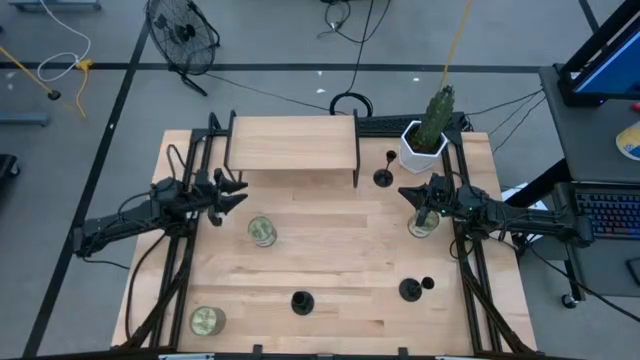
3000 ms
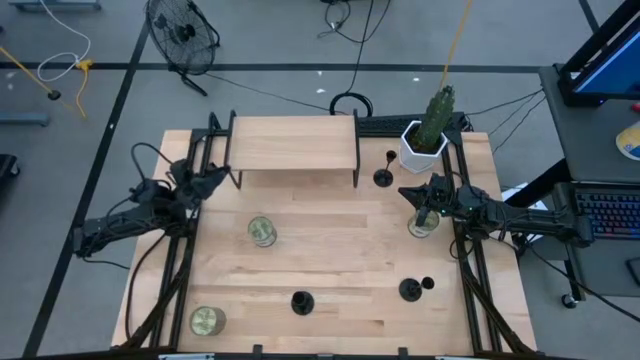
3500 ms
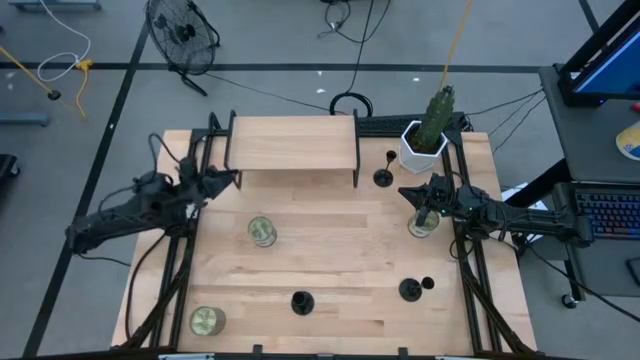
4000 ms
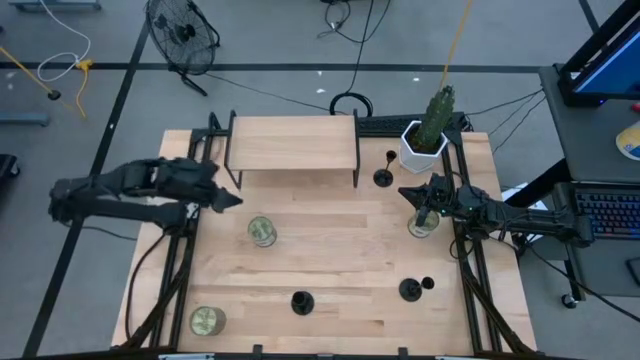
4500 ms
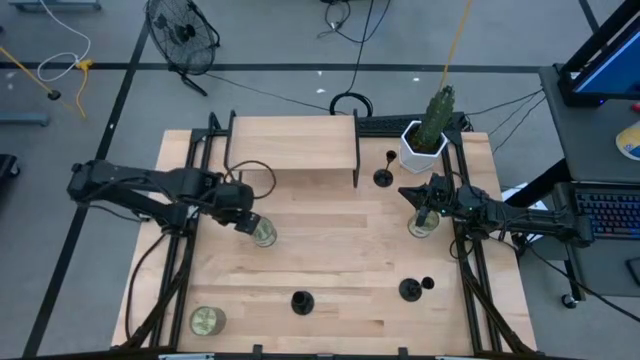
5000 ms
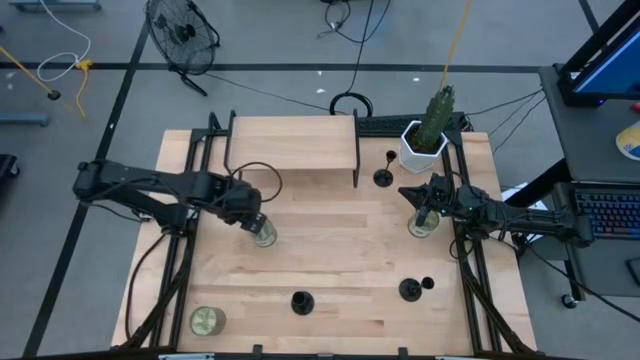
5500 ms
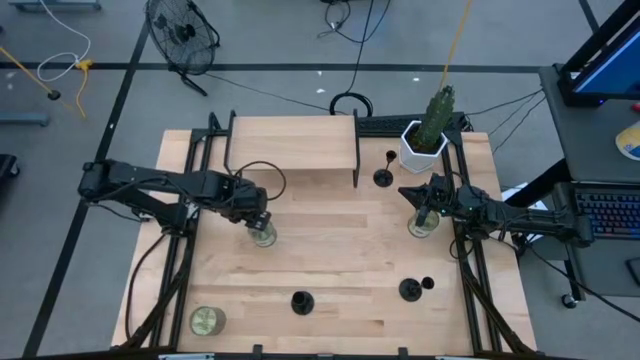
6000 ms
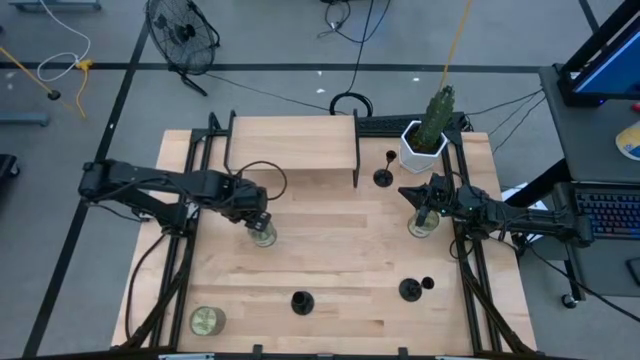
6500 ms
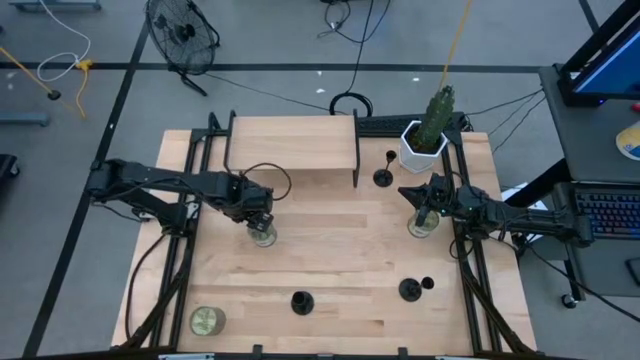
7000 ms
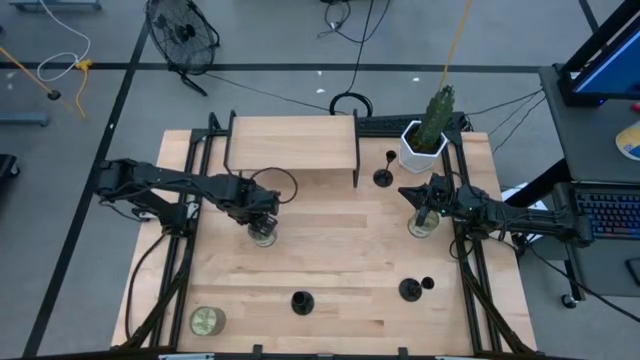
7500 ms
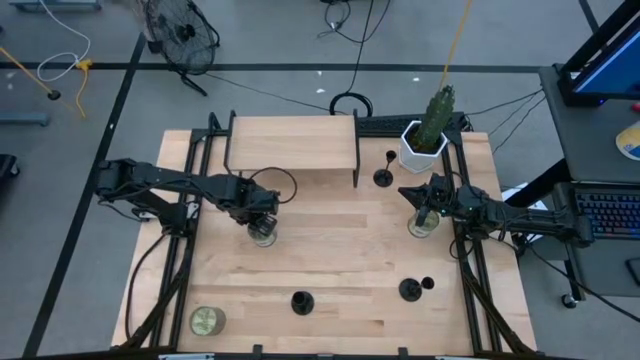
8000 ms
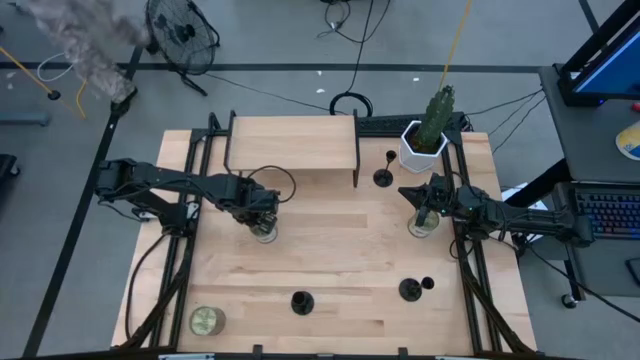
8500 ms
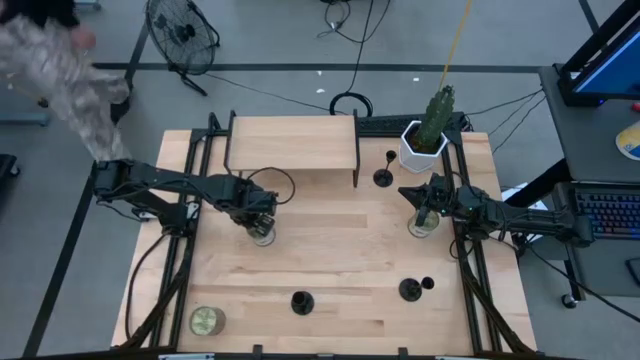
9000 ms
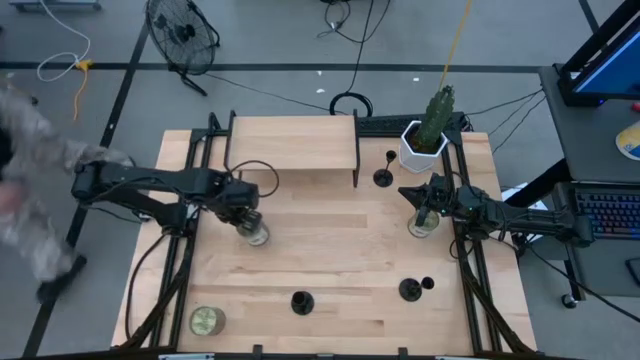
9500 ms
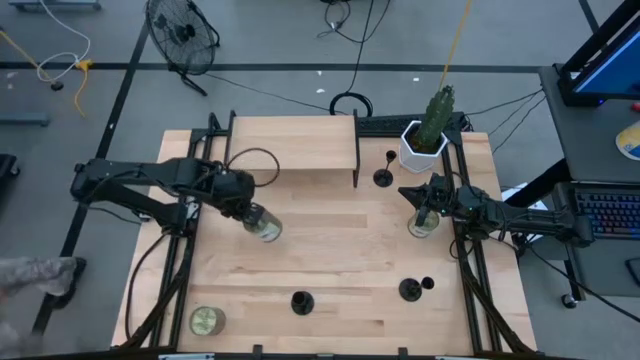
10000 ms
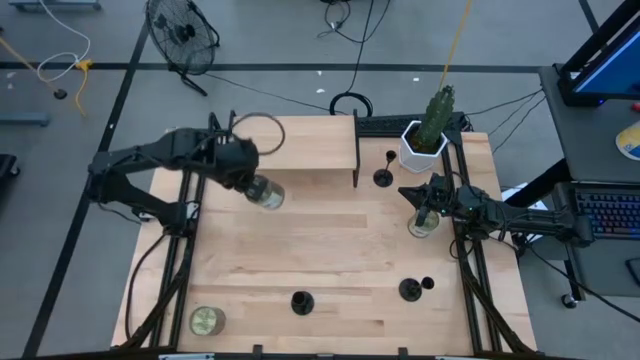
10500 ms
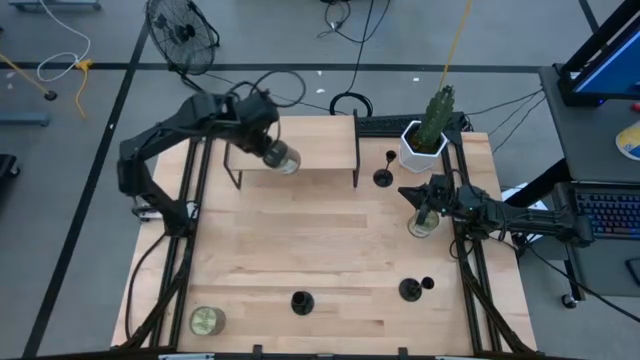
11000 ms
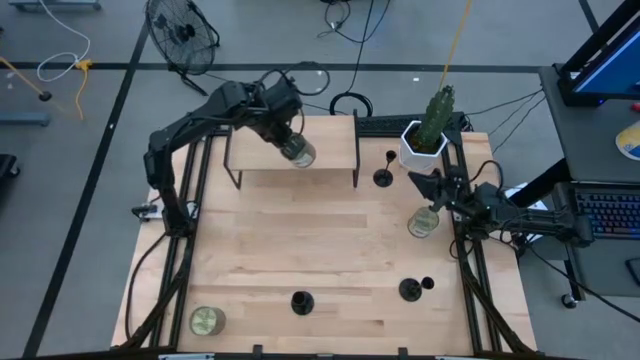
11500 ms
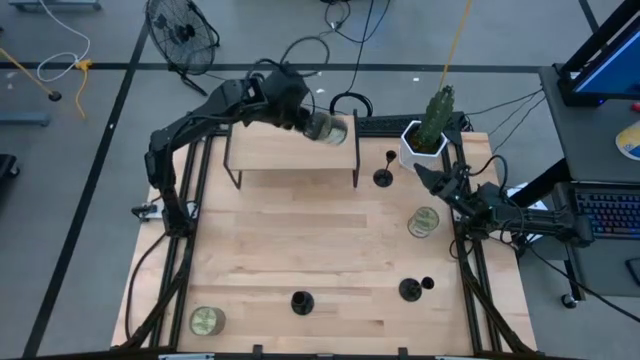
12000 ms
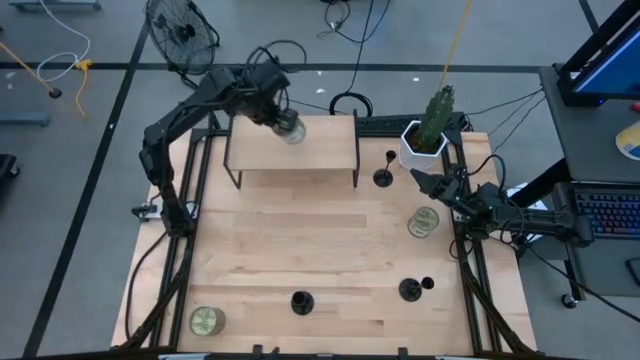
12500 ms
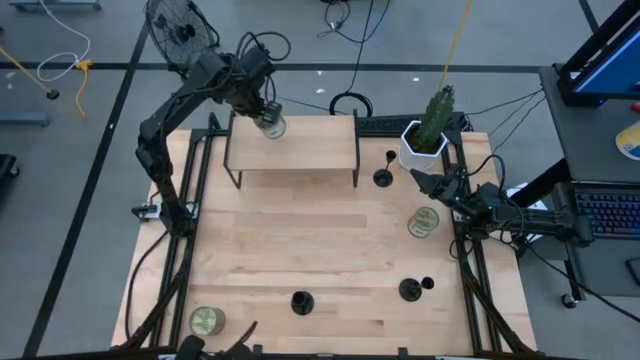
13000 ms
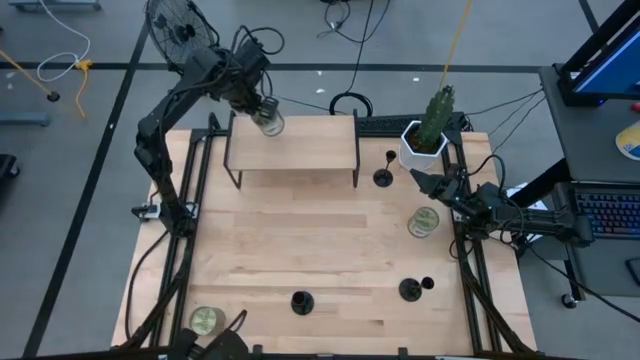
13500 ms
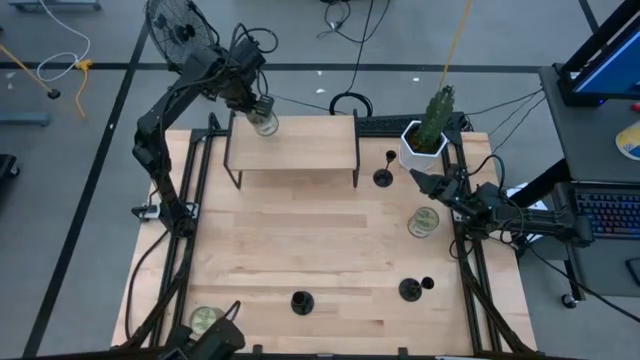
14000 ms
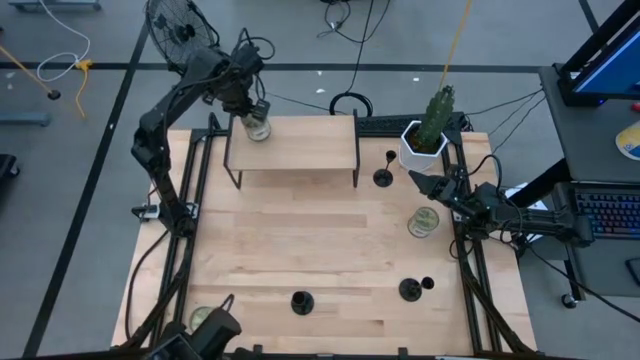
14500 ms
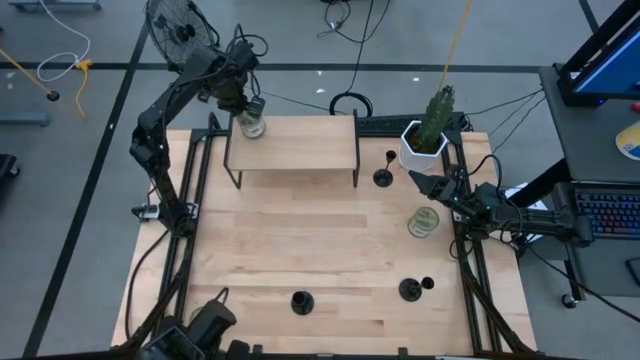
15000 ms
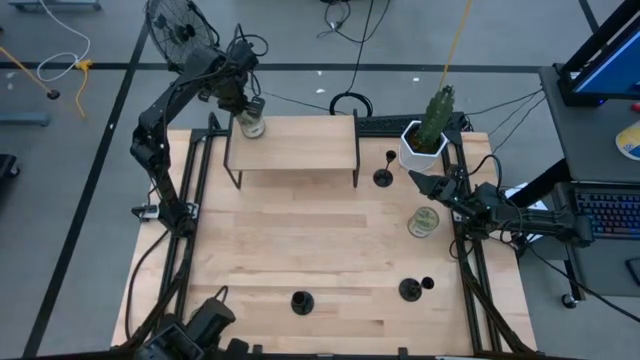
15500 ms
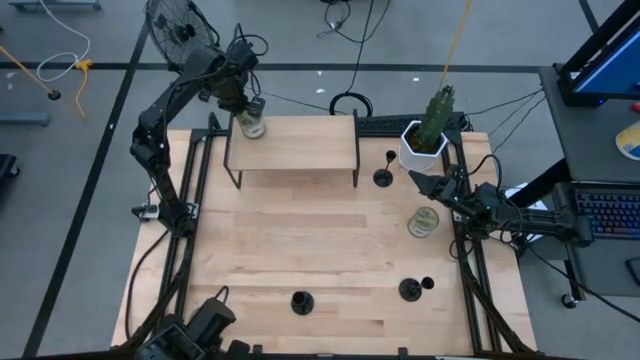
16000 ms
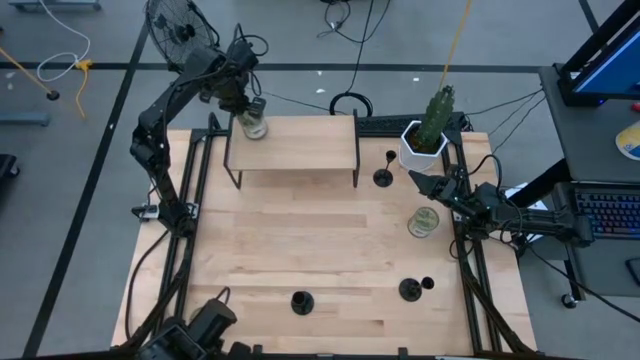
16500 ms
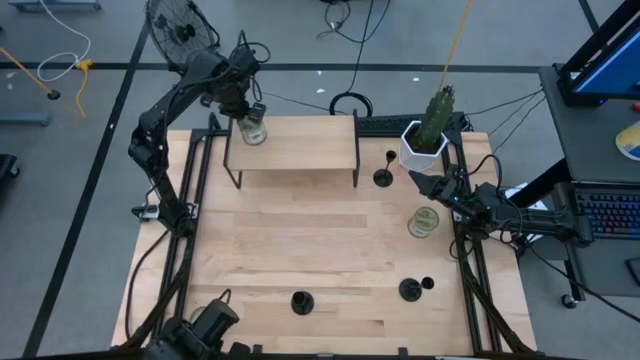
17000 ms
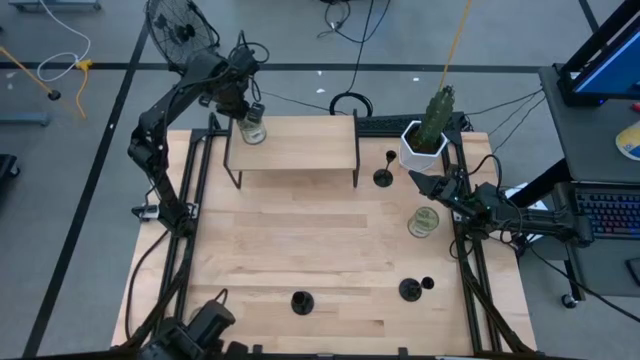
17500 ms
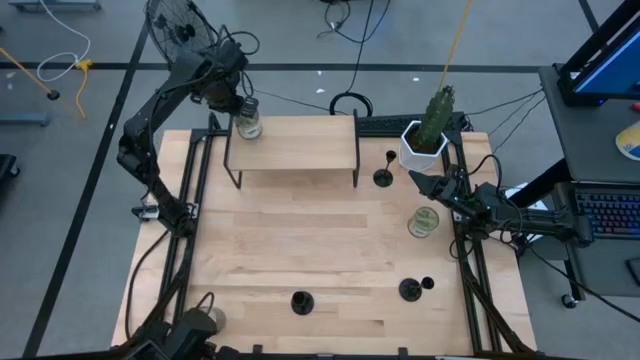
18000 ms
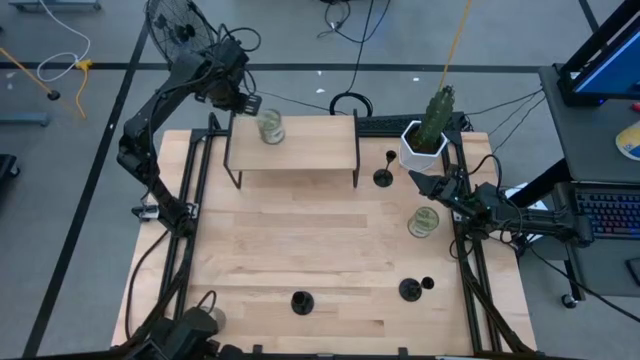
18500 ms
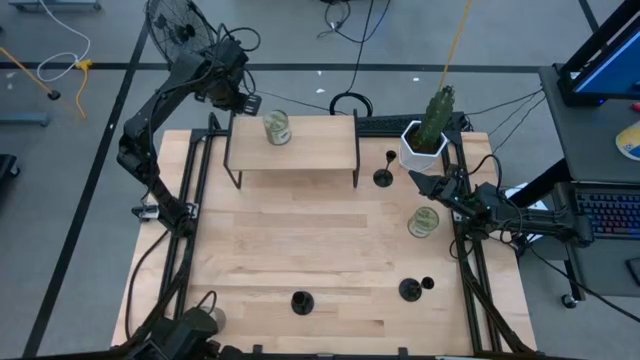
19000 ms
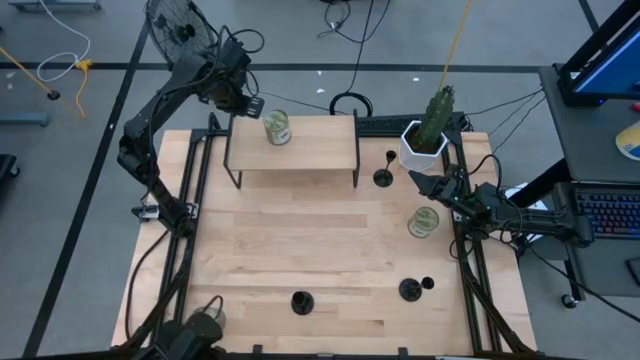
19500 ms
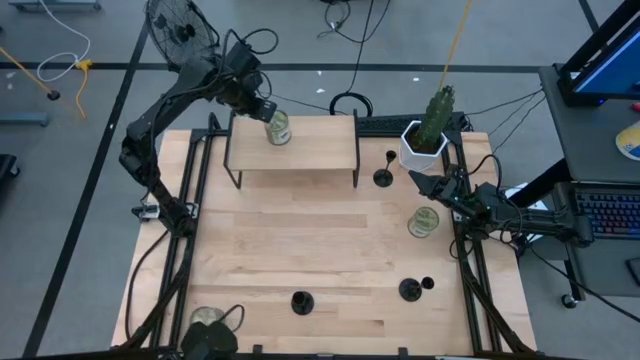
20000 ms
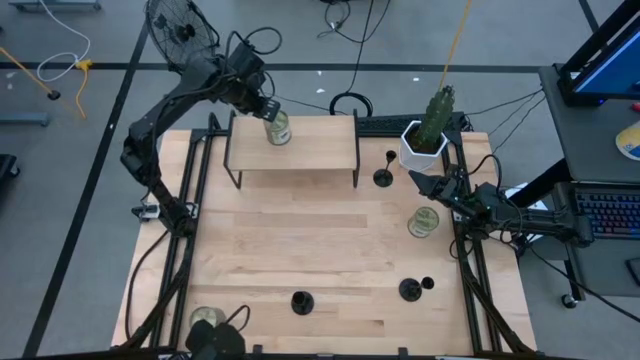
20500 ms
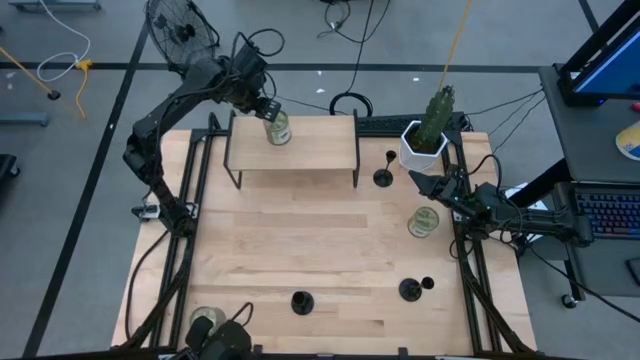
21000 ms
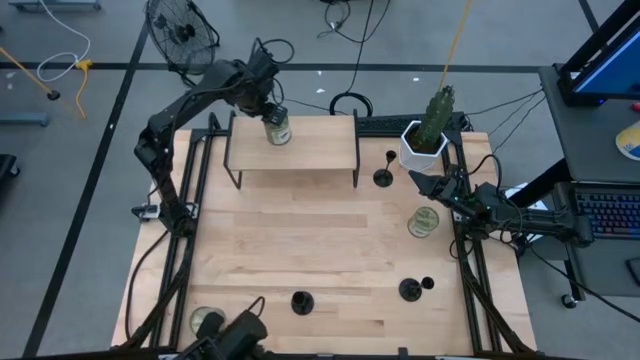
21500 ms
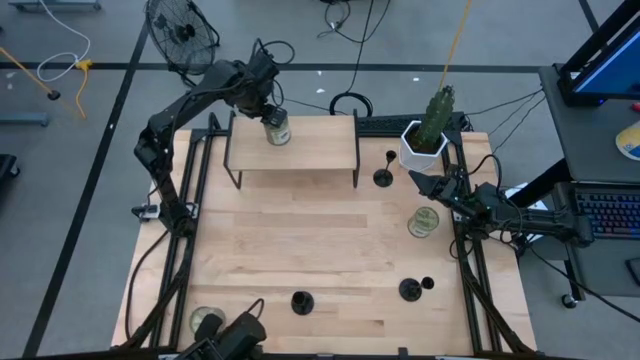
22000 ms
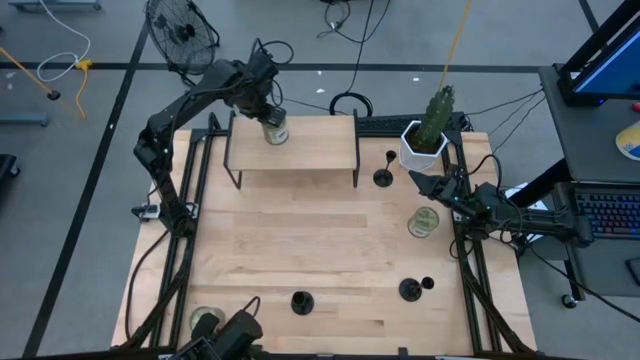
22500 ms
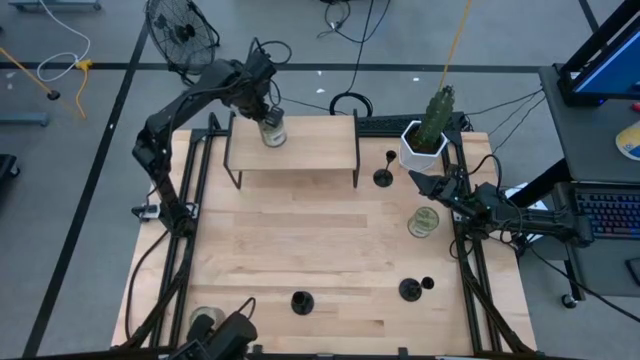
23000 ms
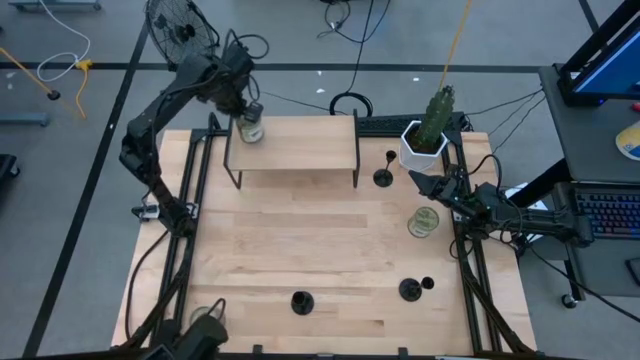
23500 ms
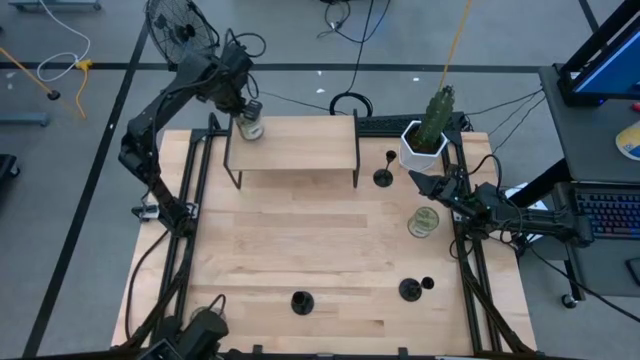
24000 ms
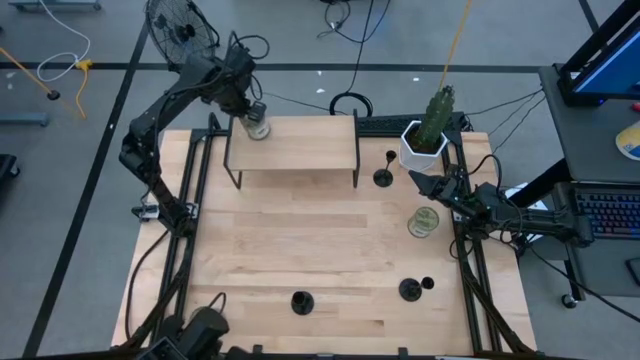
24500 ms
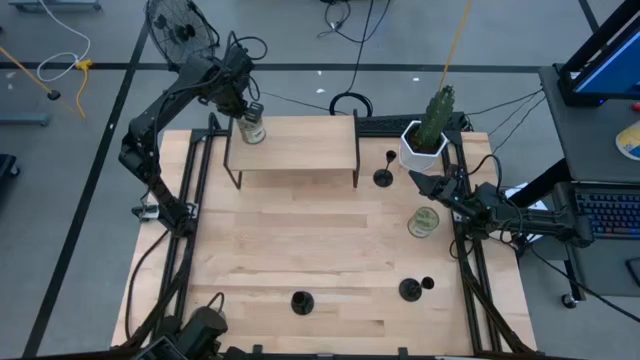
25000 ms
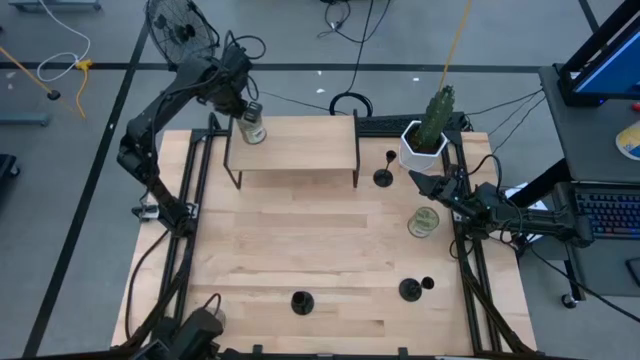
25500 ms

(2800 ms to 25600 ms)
Task: Pick & Place candle stick holders
Put the middle silver scented candle on the shelf
